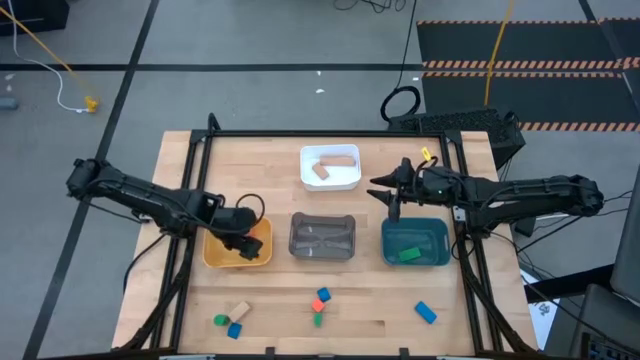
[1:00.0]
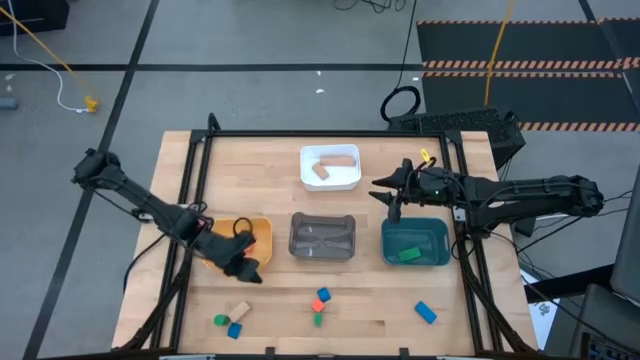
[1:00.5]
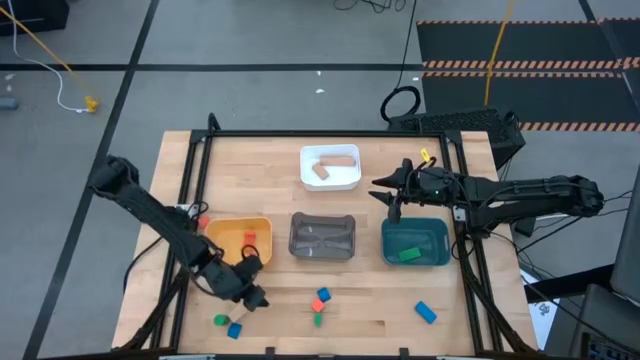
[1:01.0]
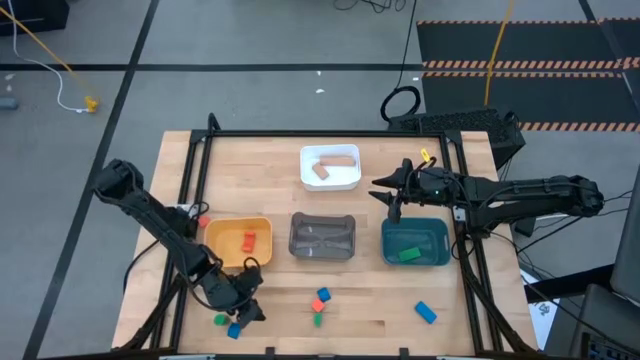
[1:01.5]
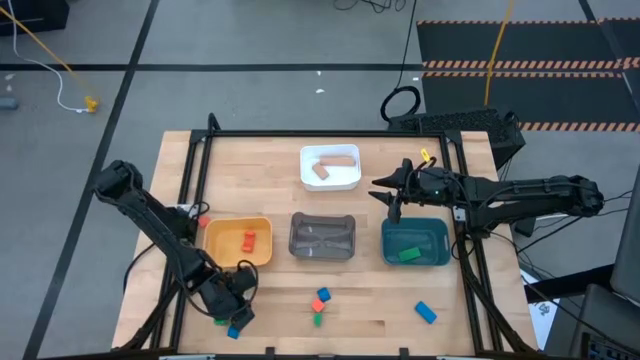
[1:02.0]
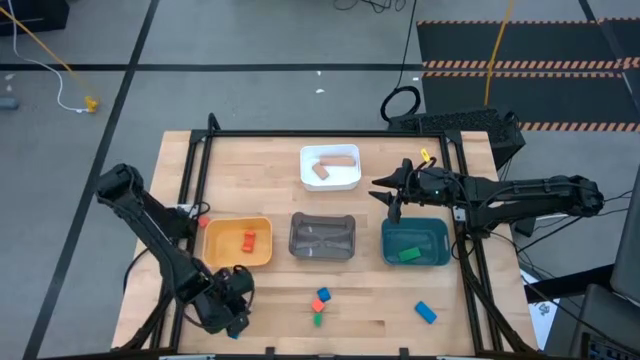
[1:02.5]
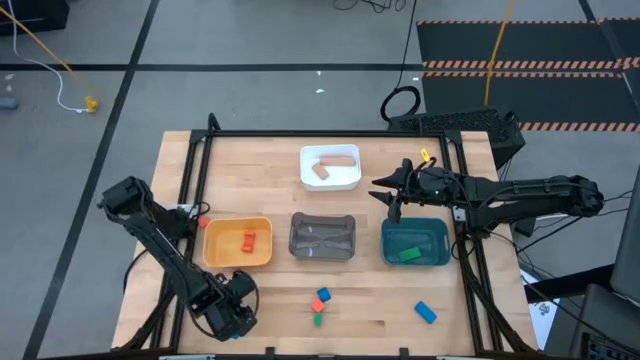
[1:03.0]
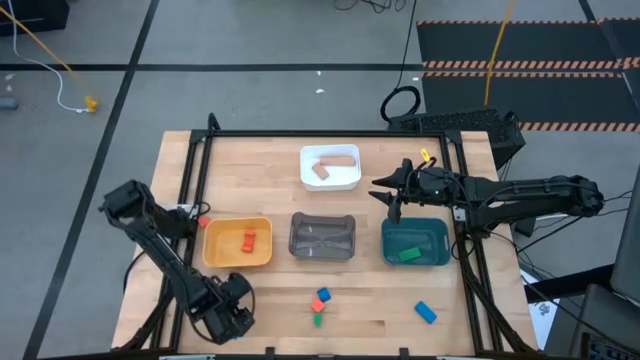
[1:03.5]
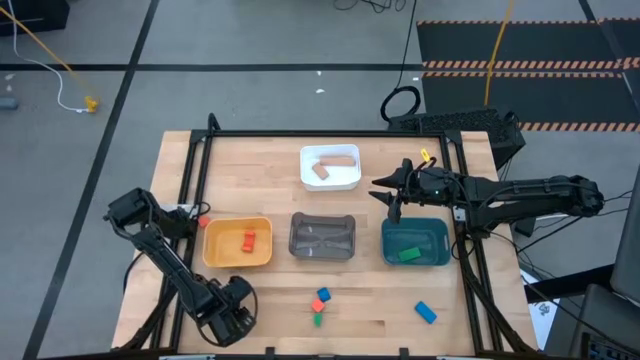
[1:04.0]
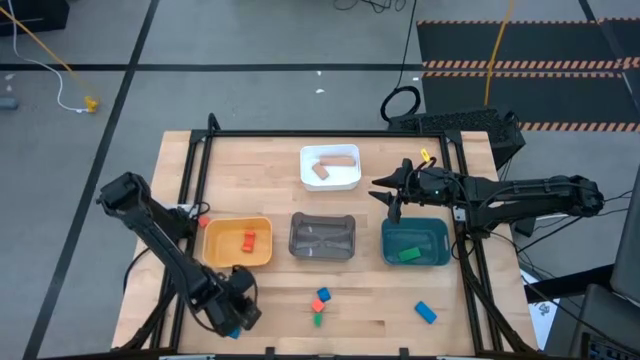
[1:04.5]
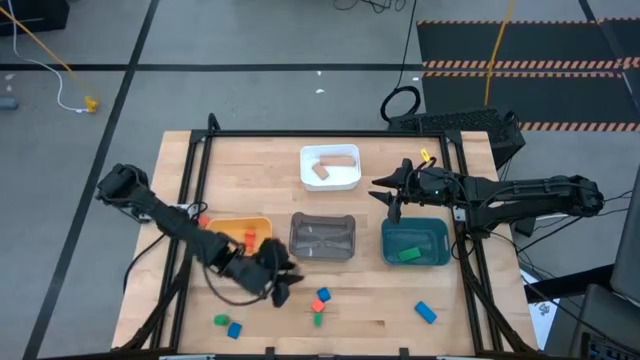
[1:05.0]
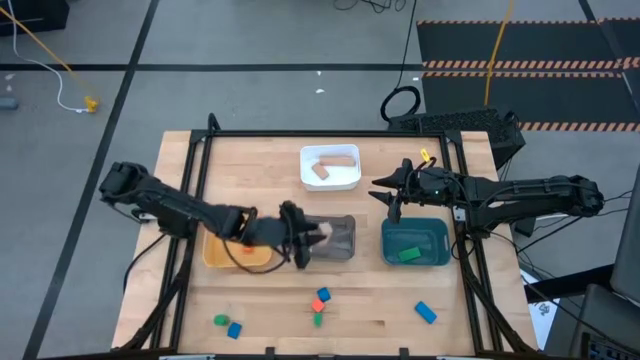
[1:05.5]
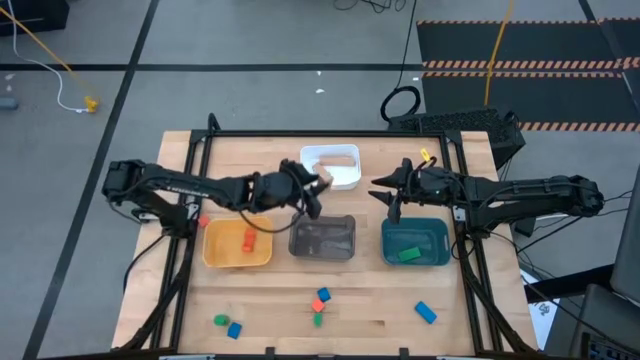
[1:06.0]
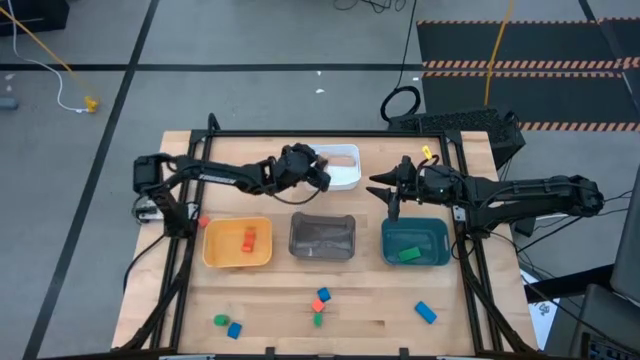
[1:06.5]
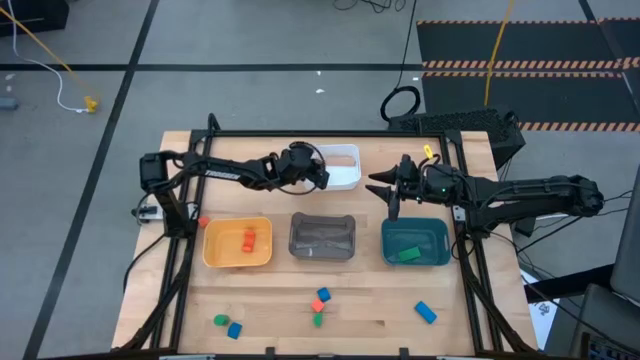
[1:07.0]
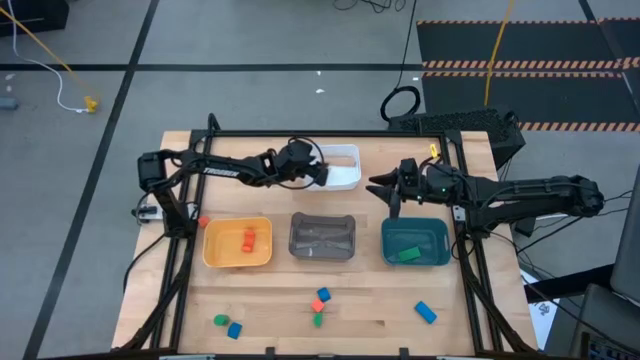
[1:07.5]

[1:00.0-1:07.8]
Task: Sort & place blocks by color
Put the big cube wooden block into the white bin

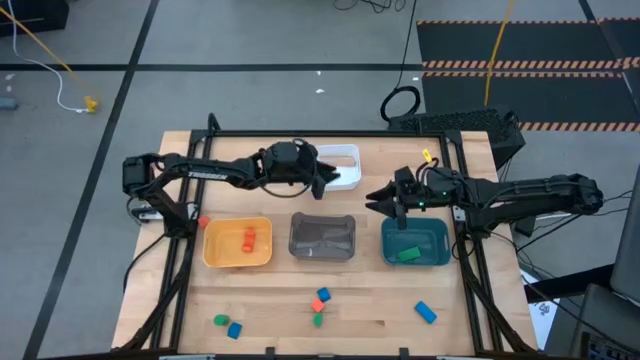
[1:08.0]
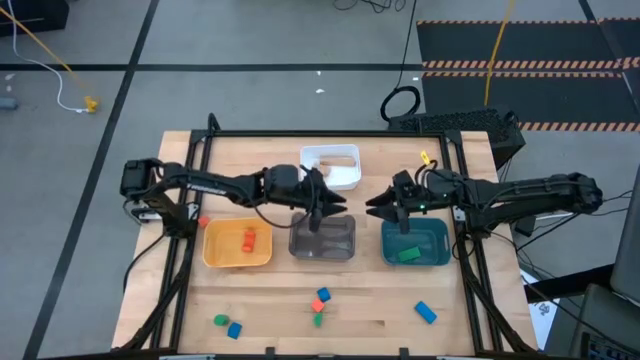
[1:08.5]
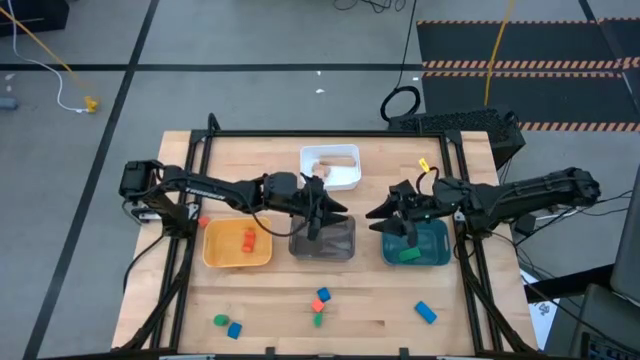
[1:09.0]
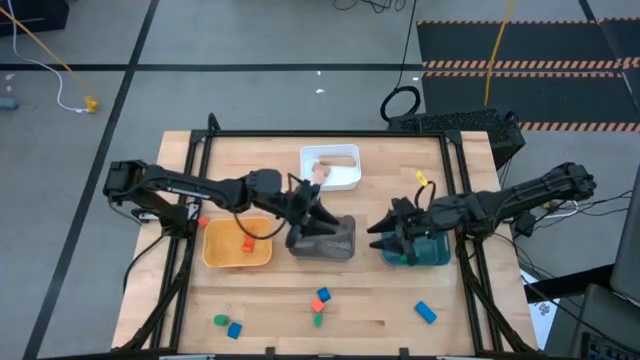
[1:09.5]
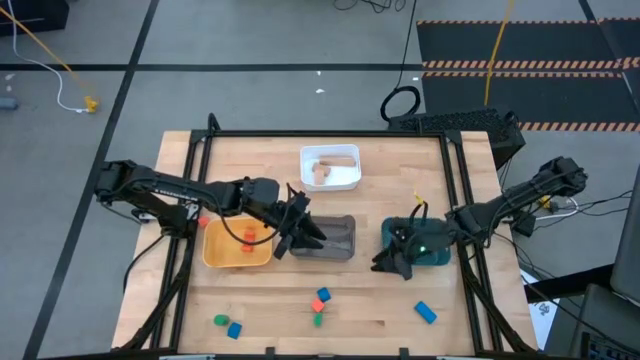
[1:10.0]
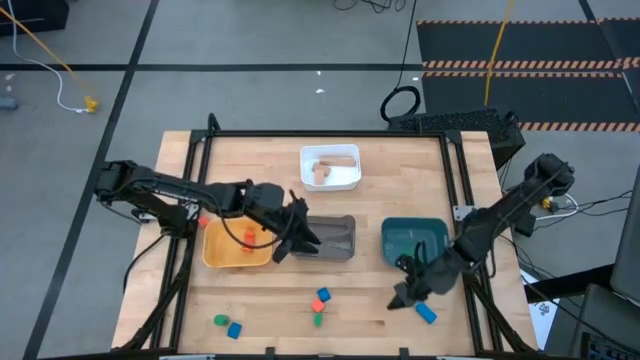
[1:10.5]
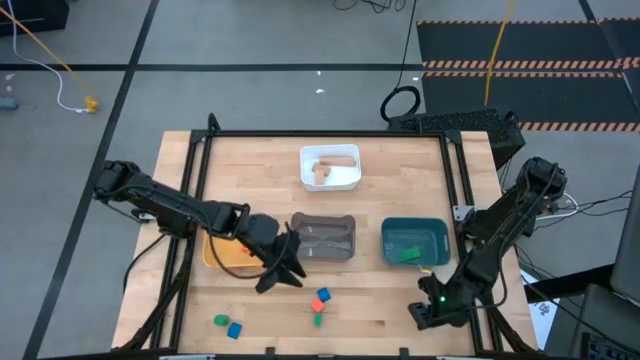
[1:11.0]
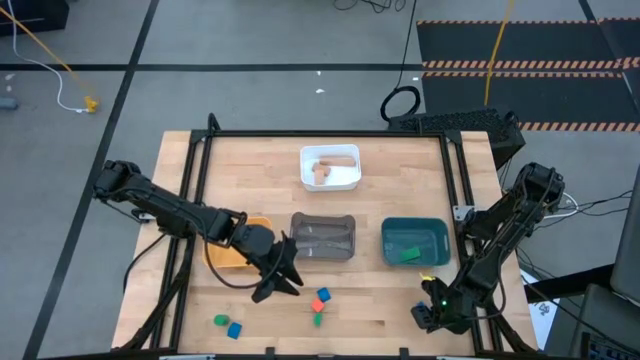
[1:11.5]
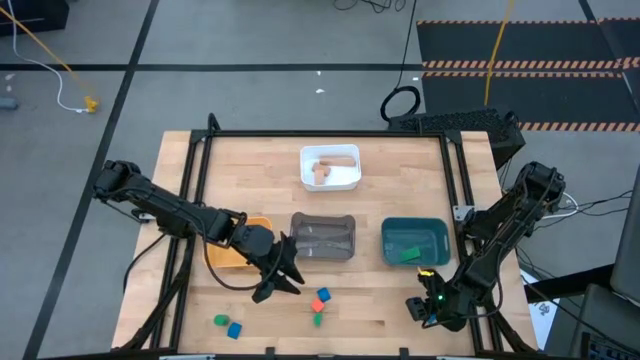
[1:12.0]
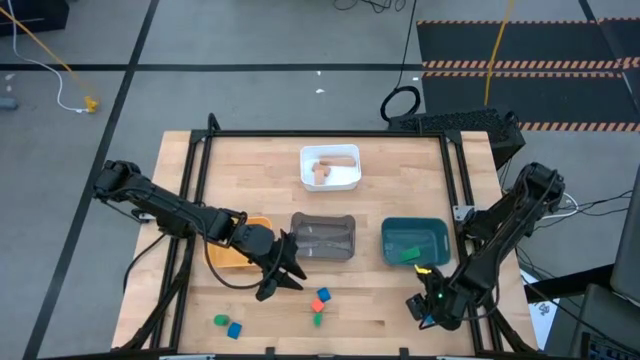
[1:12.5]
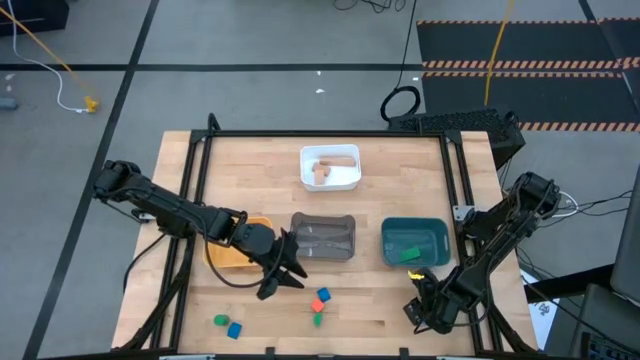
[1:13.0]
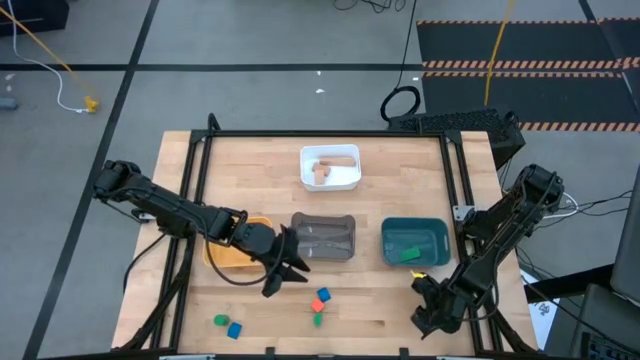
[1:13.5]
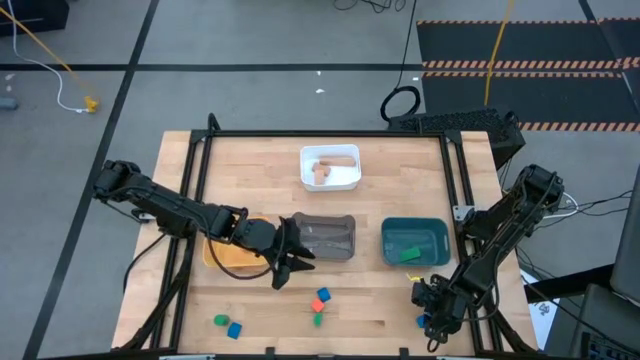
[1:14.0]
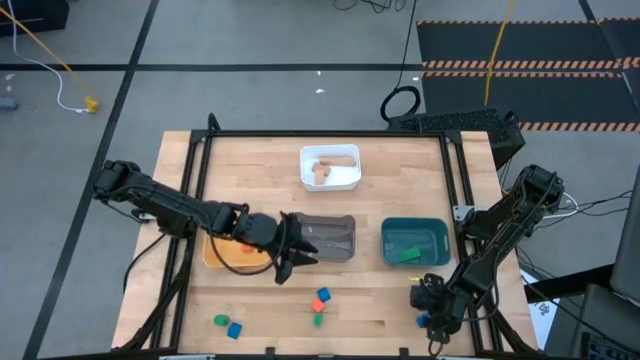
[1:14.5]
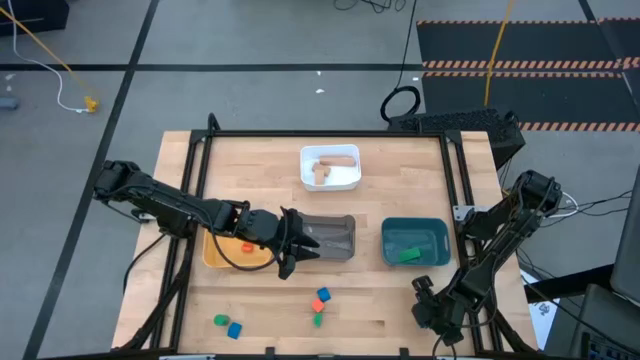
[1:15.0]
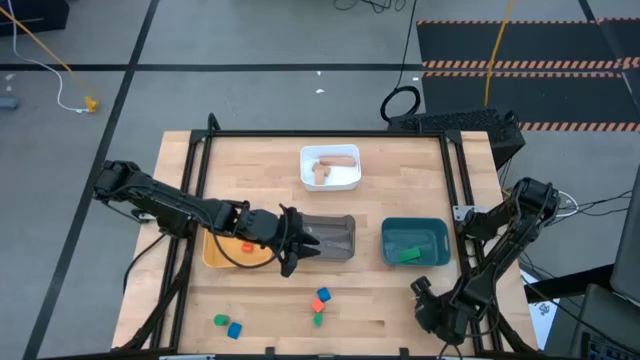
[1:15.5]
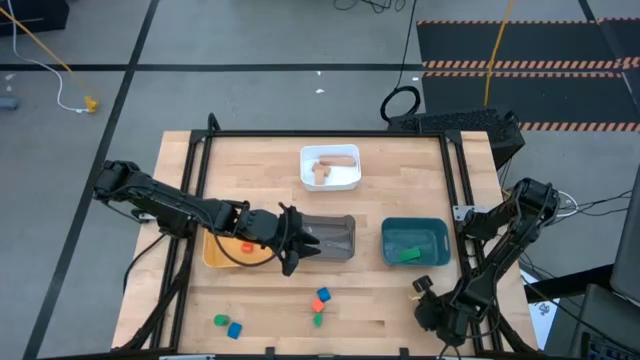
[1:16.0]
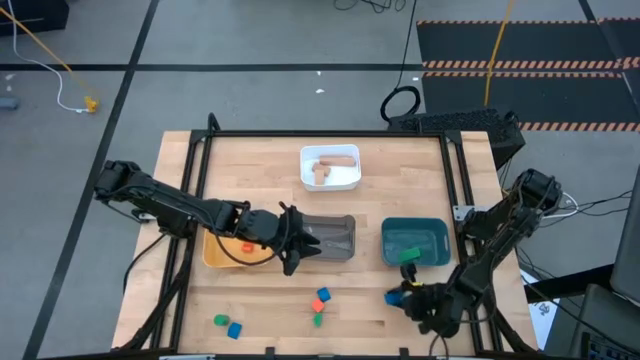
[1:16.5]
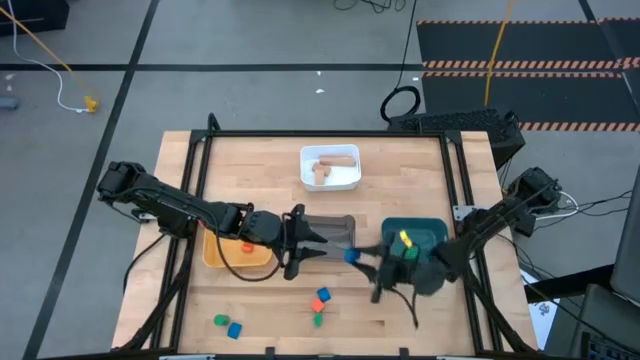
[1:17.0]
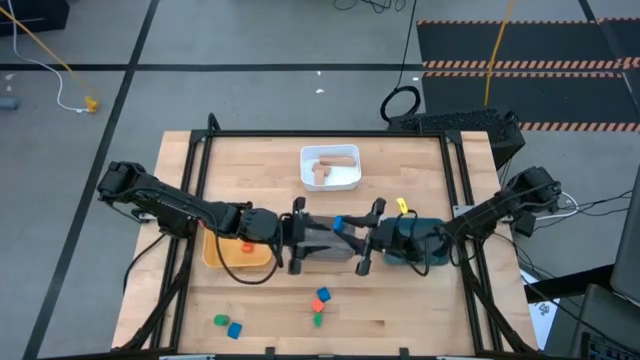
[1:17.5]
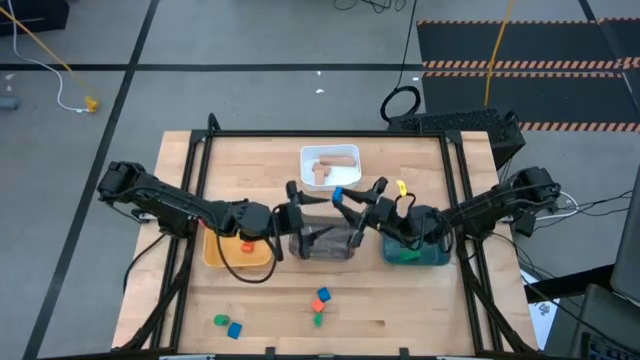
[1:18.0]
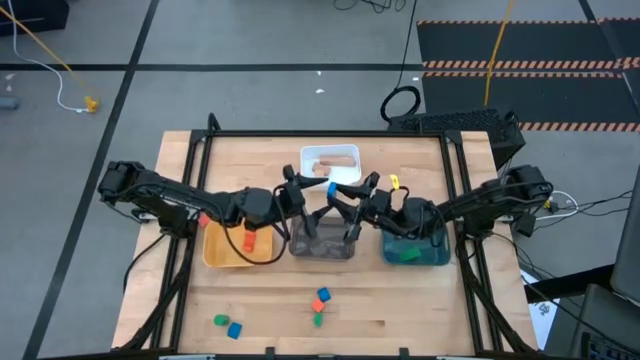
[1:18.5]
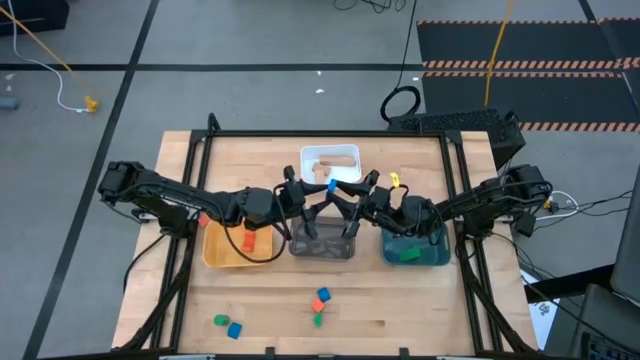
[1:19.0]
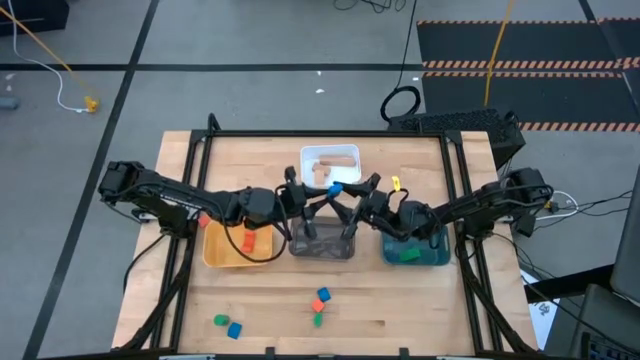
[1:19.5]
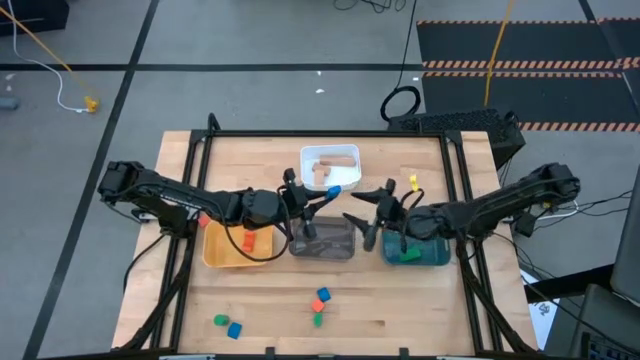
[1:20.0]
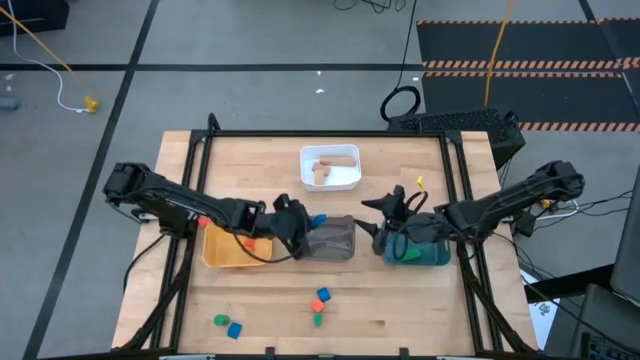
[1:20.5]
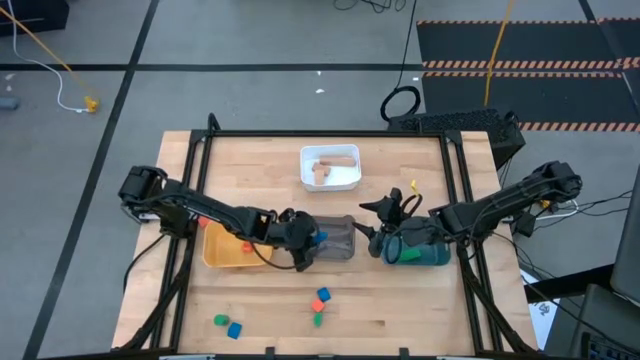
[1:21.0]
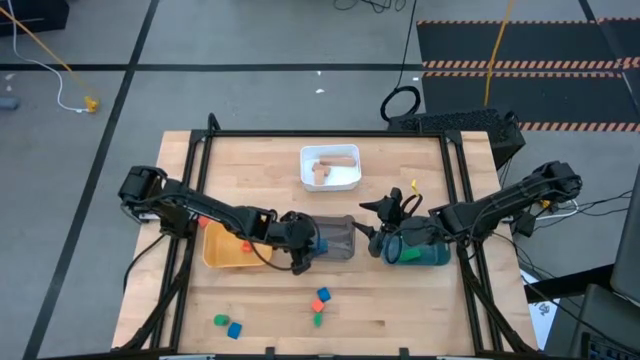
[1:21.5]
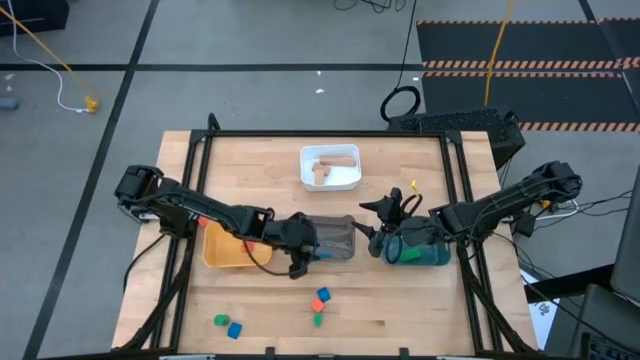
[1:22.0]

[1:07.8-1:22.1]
Put the right small rectangular blue block into the black bin
